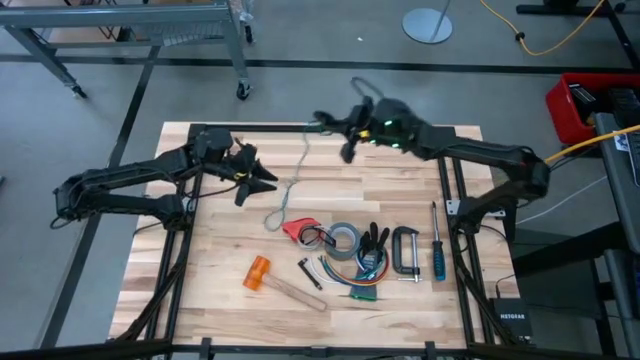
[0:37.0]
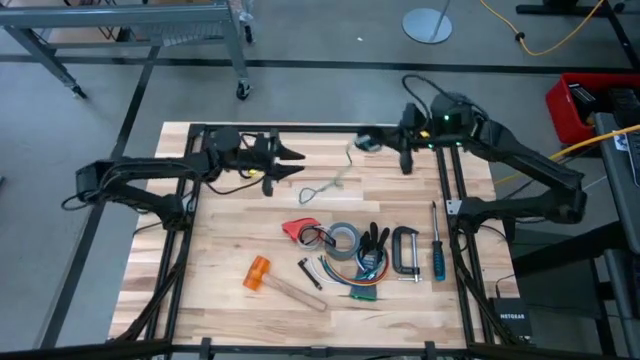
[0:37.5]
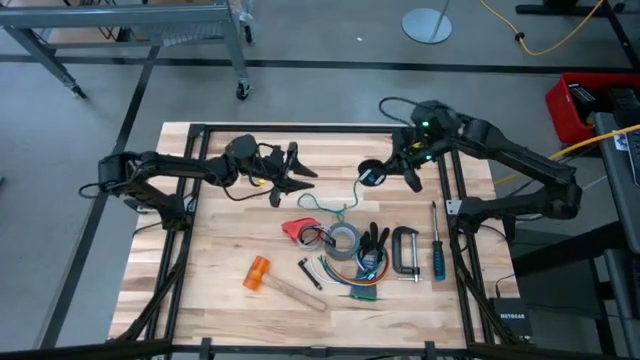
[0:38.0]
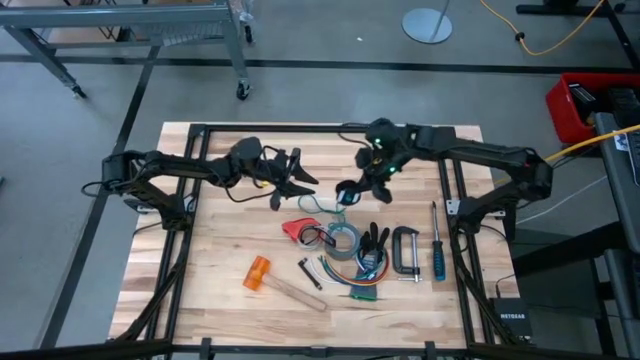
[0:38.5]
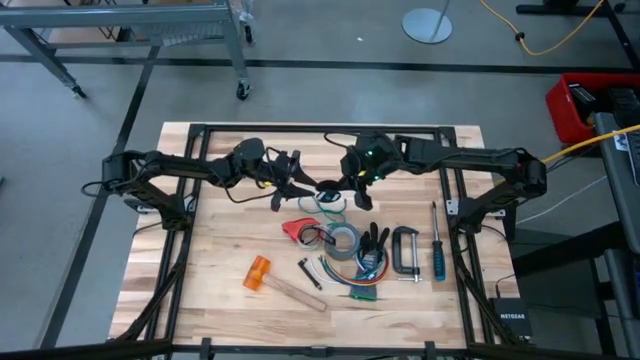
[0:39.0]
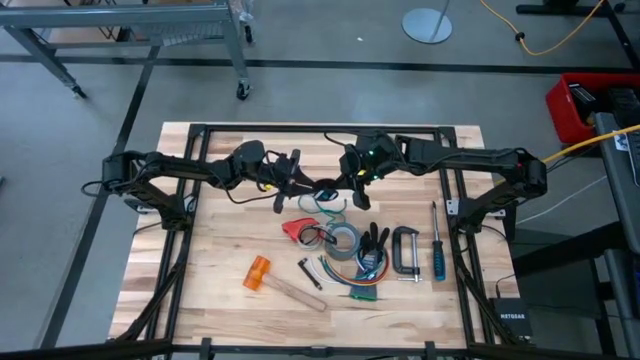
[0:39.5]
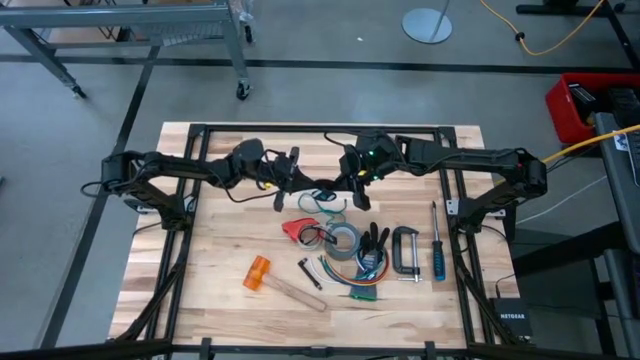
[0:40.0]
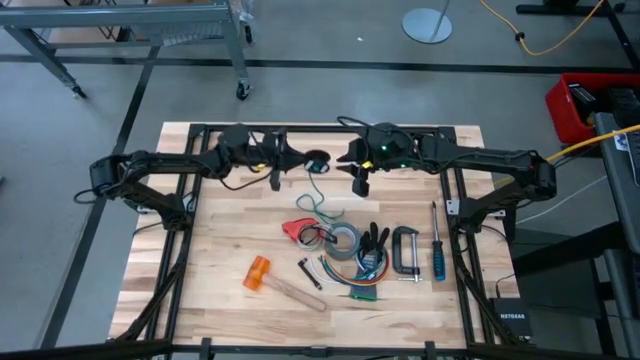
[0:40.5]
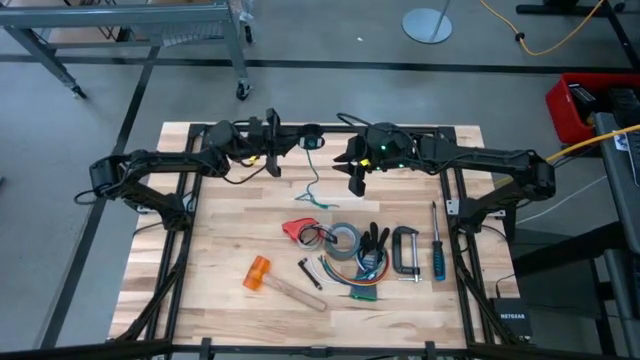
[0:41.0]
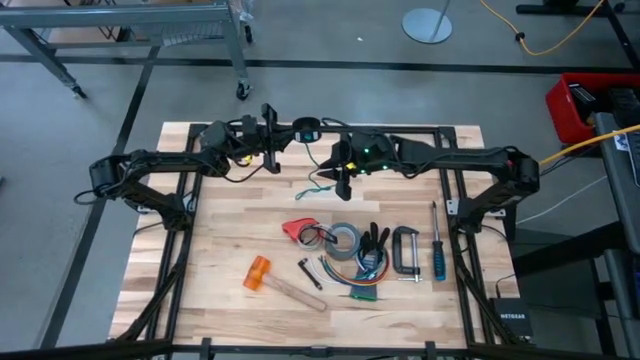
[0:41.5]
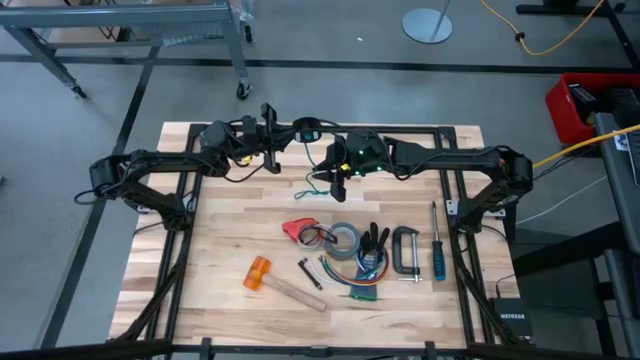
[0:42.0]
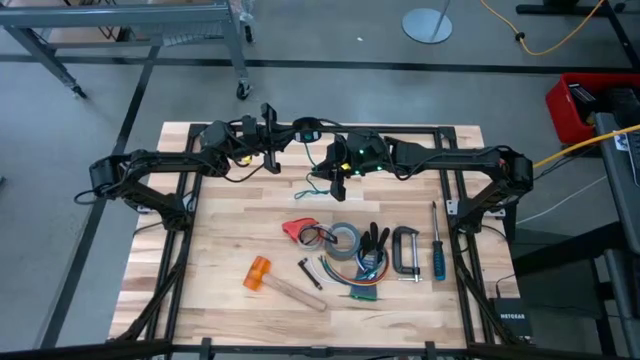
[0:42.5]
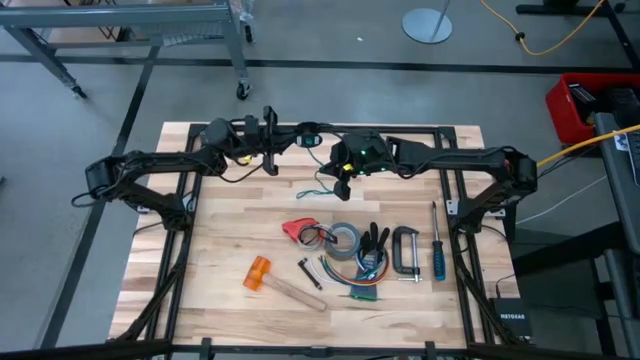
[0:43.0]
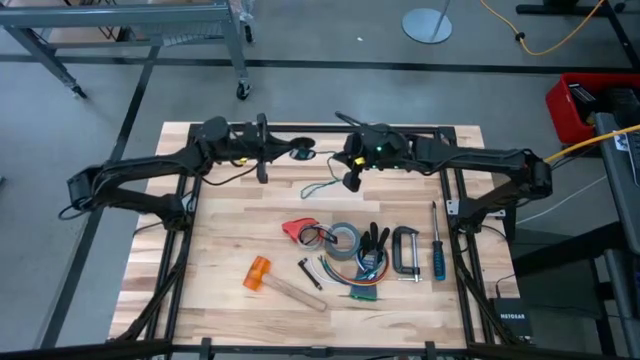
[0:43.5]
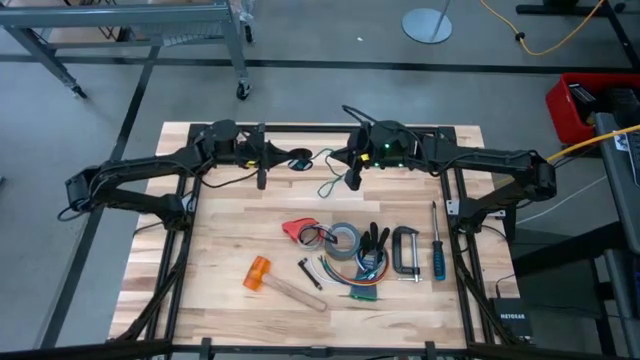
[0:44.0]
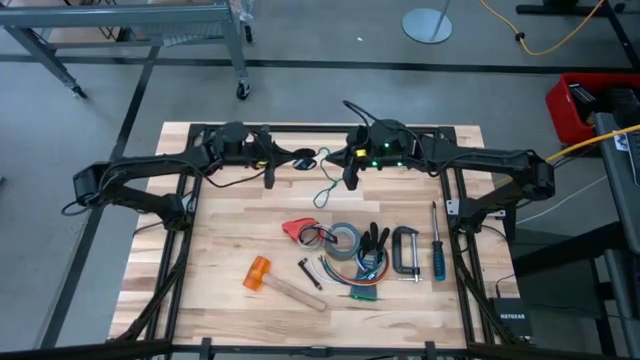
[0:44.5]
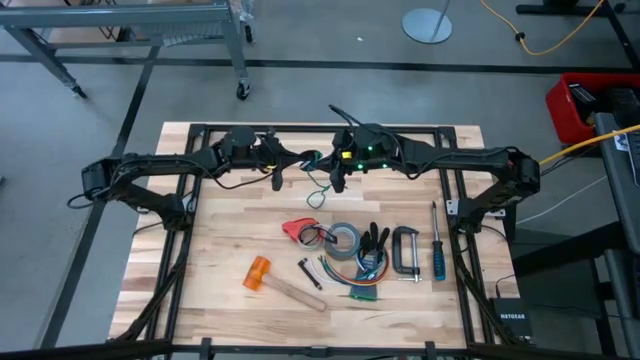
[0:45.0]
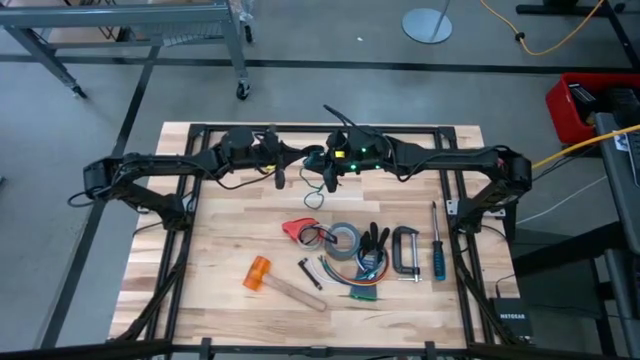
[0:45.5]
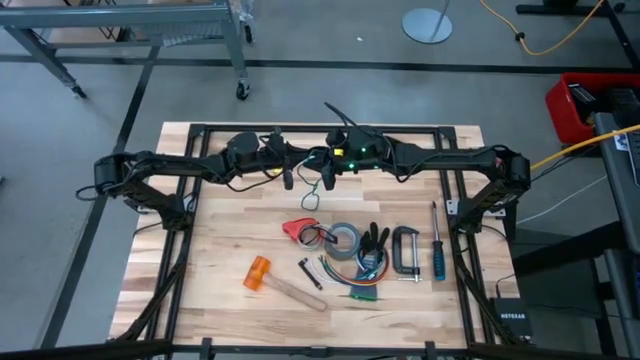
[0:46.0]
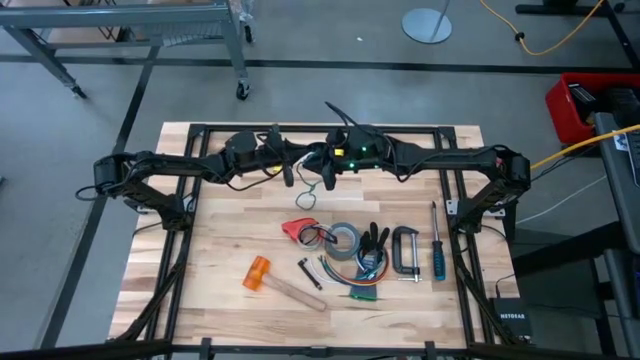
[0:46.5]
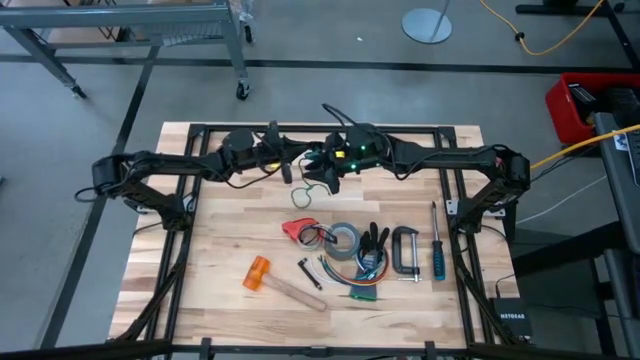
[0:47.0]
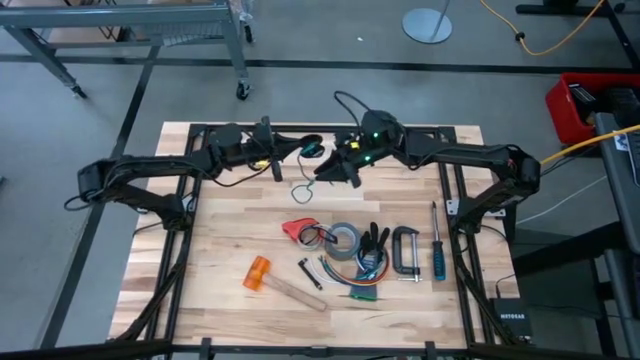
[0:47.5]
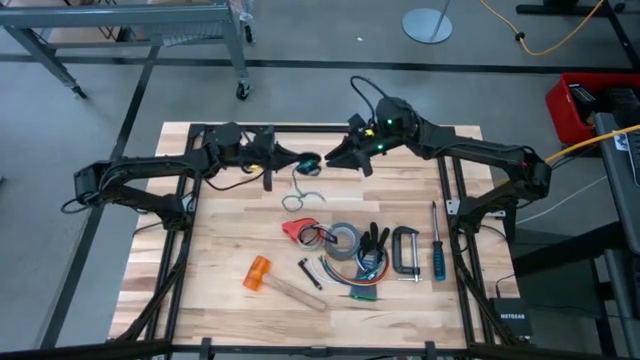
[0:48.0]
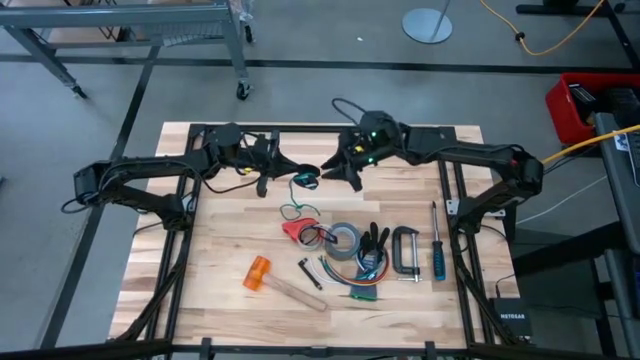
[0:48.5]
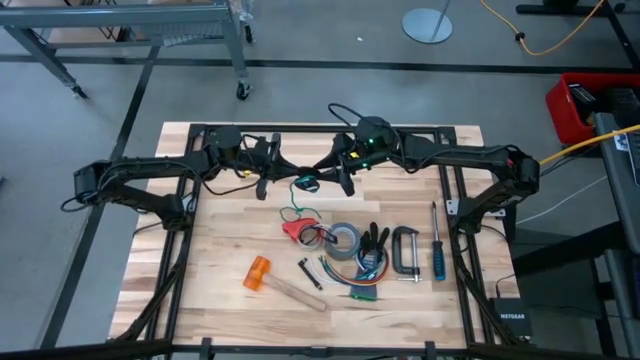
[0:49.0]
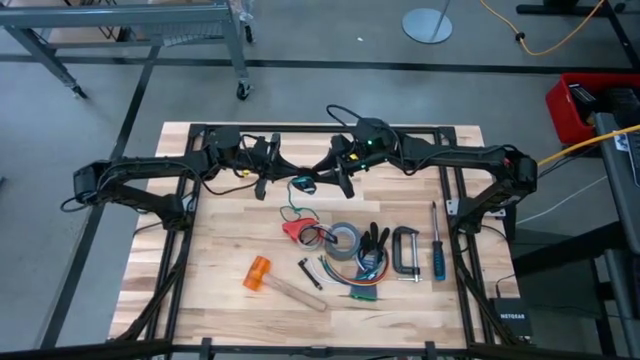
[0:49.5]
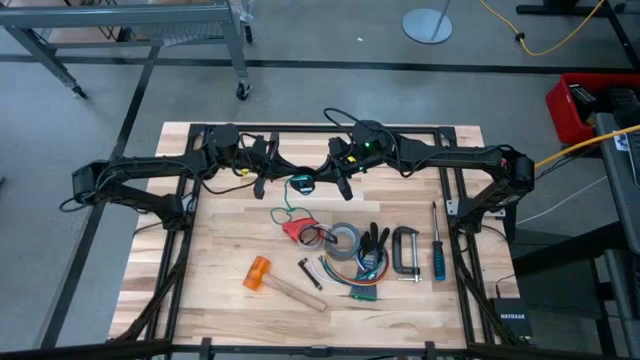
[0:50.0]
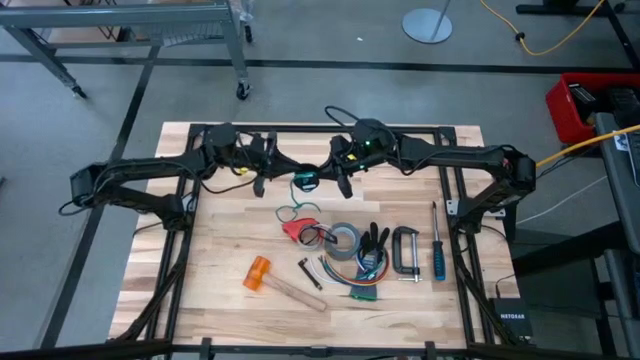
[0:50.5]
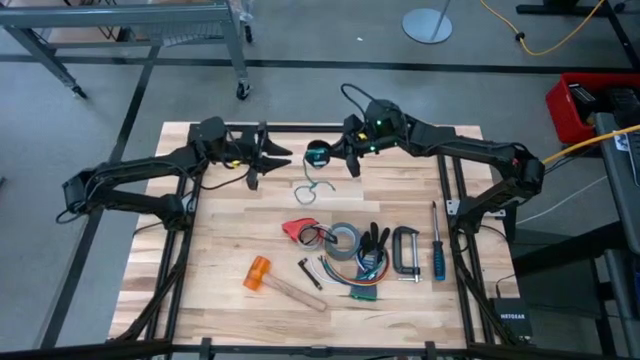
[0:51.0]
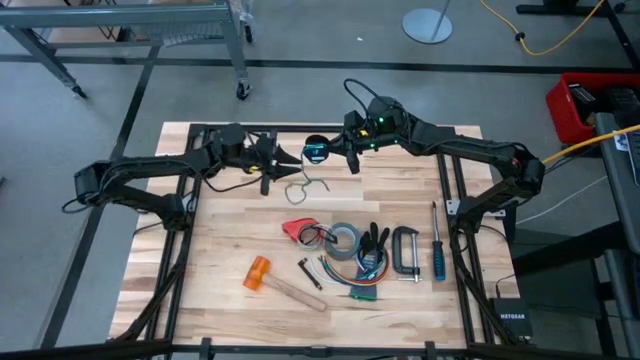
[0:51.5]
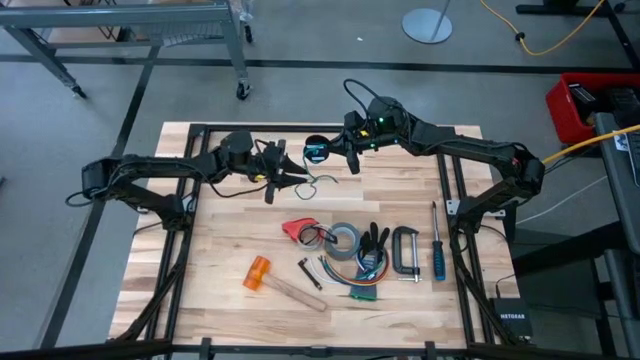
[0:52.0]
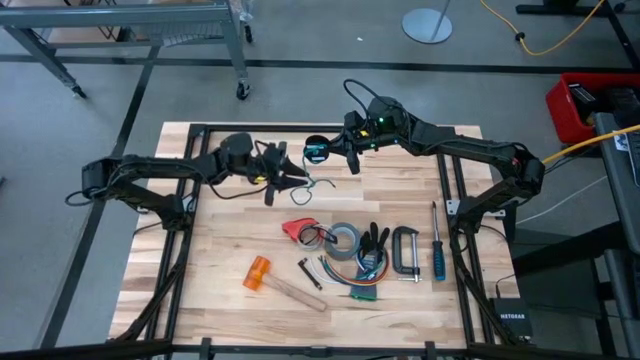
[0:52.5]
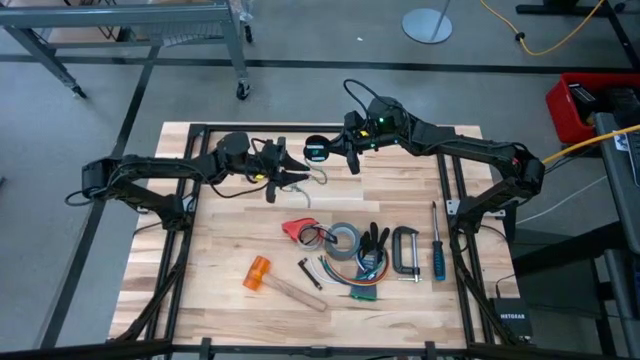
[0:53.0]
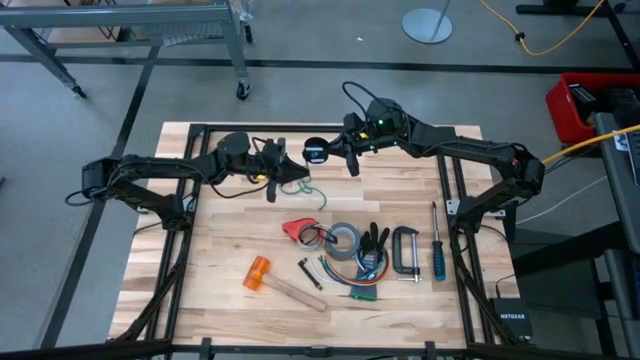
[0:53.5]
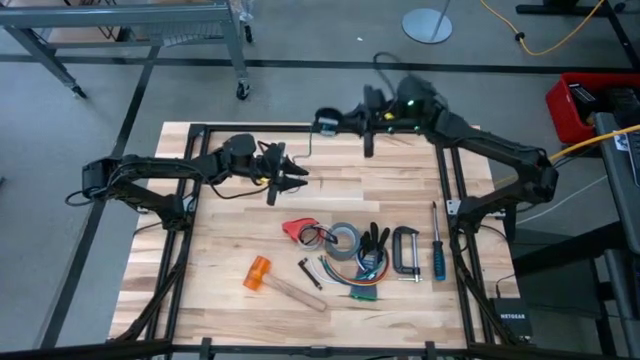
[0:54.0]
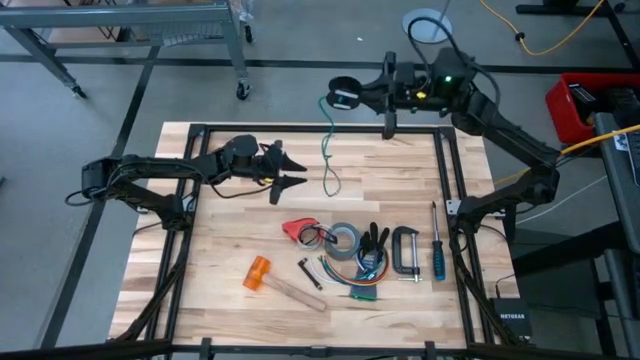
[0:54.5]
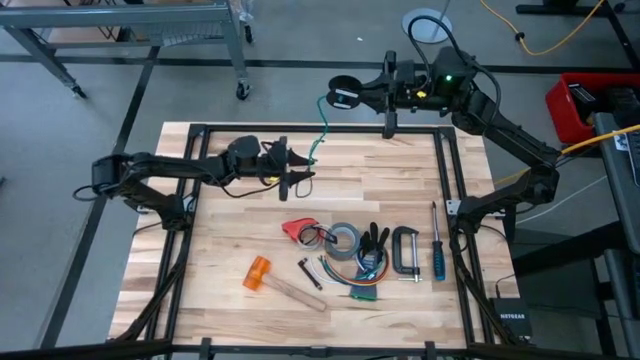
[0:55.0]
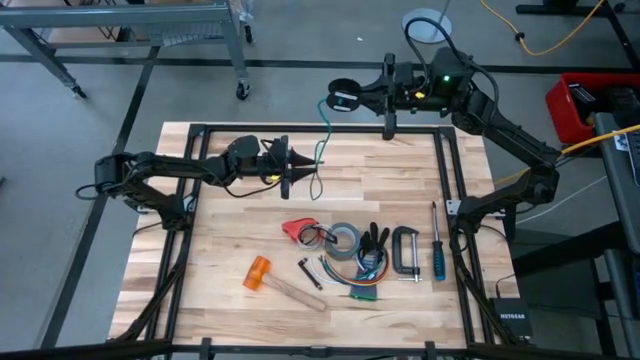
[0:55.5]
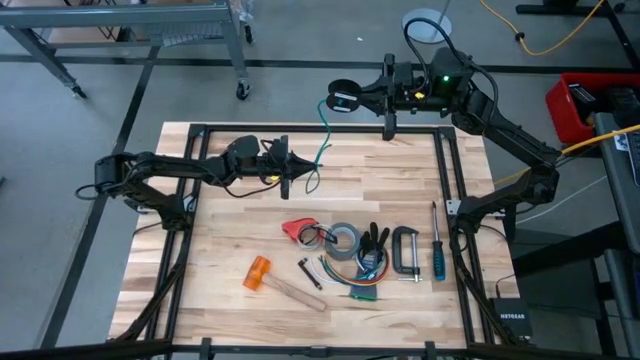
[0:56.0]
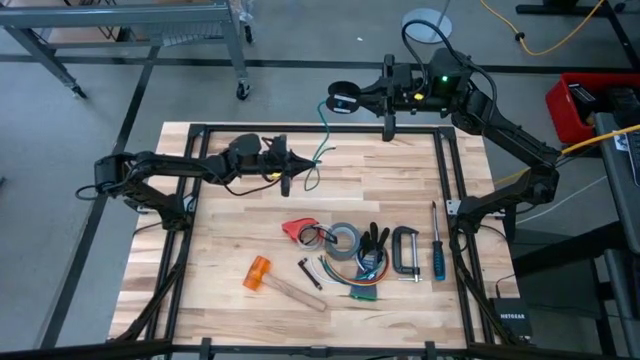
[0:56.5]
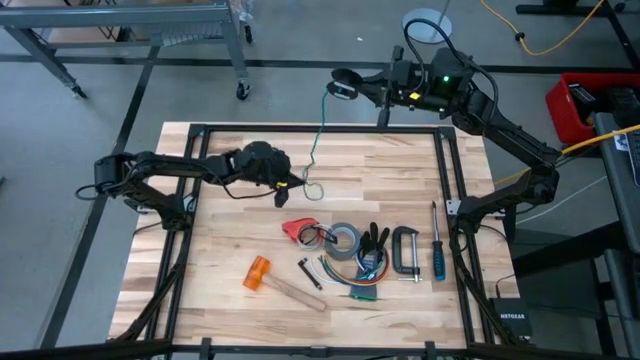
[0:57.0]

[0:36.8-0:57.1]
Task: Coil cords
Coil the green cable wire on the black spool

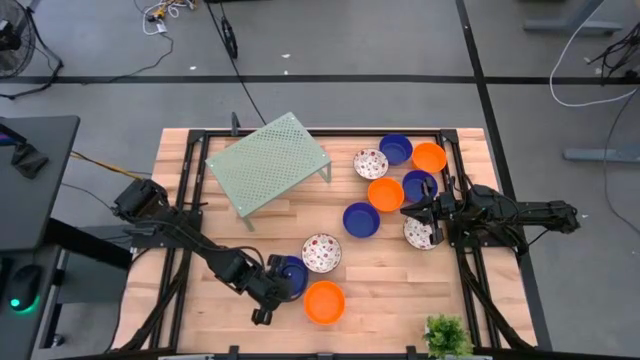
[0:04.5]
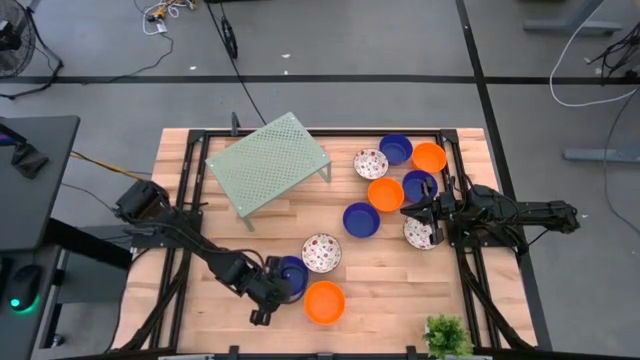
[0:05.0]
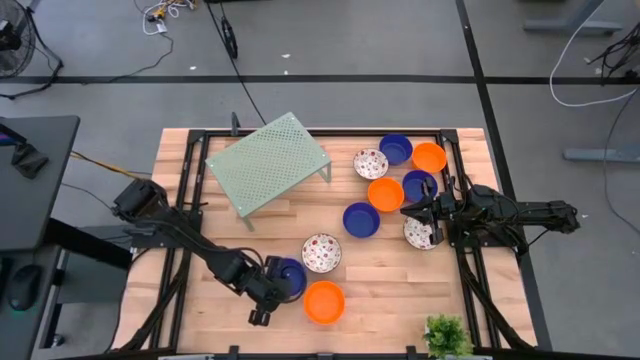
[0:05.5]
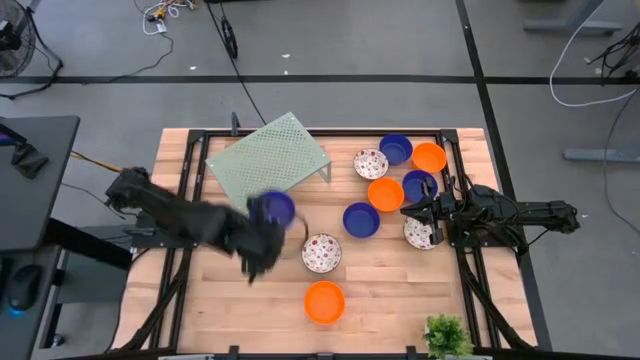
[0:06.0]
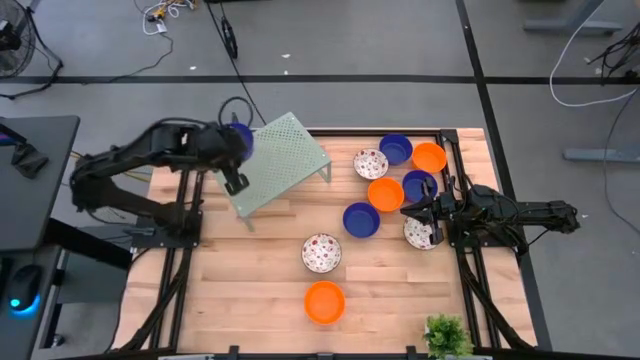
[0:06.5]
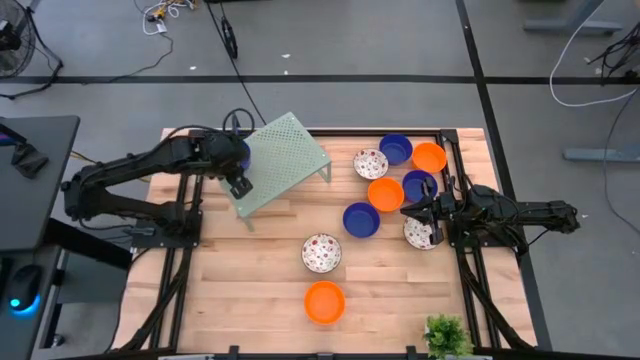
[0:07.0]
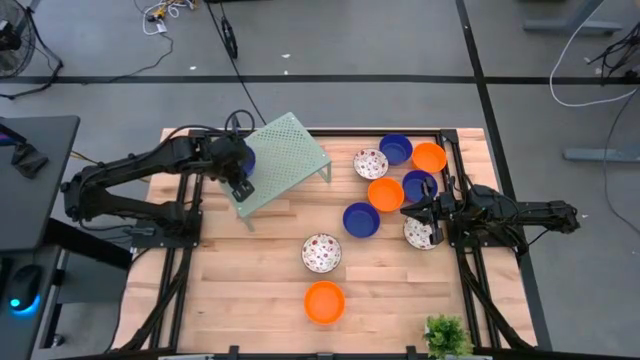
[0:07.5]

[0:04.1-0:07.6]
Task: Pick & Place Mini bowls
Put the blue bowl on the shelf
